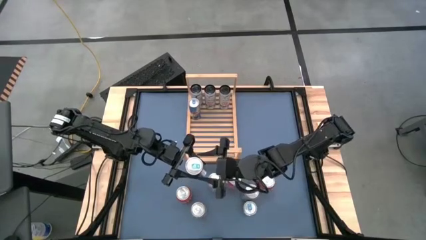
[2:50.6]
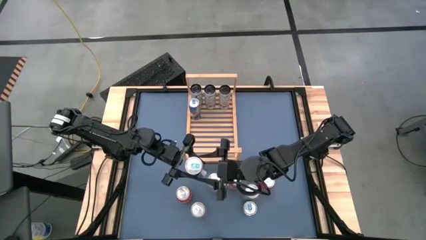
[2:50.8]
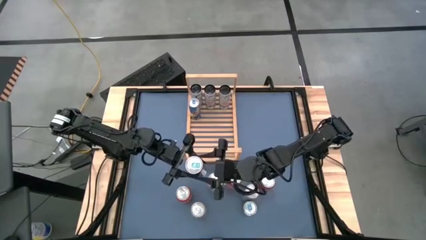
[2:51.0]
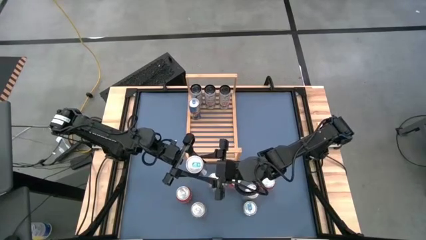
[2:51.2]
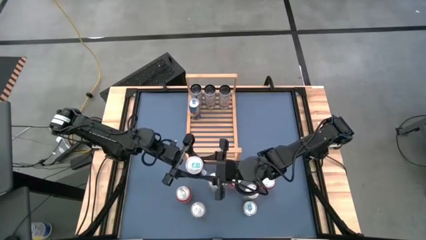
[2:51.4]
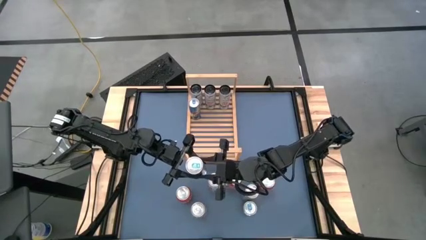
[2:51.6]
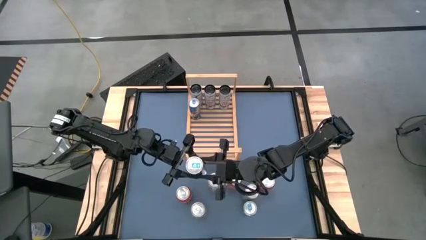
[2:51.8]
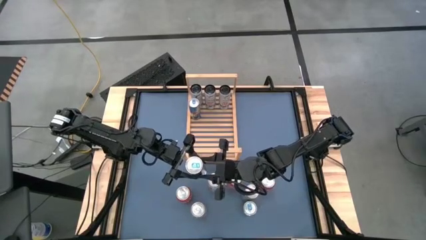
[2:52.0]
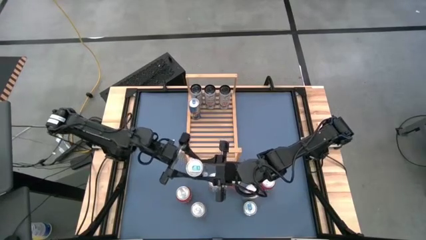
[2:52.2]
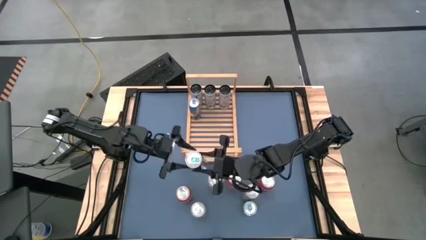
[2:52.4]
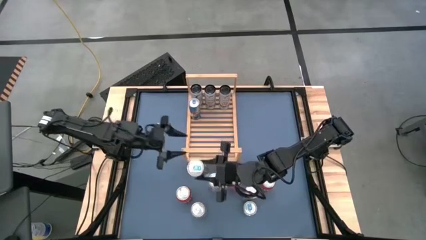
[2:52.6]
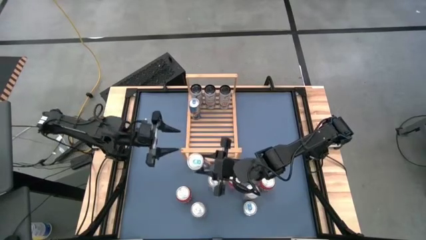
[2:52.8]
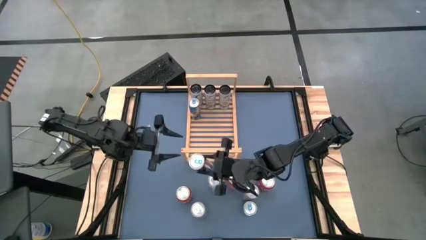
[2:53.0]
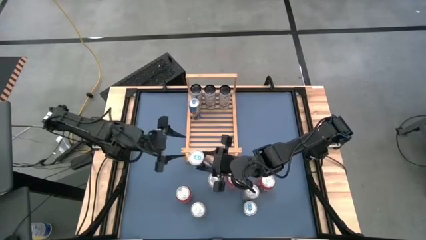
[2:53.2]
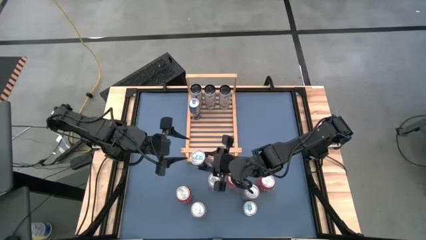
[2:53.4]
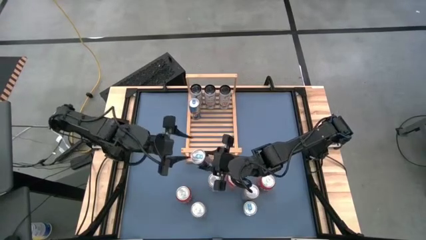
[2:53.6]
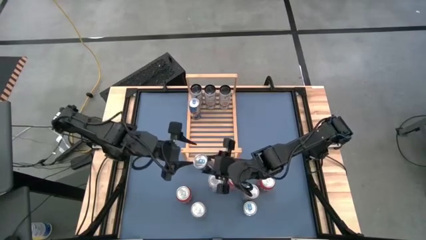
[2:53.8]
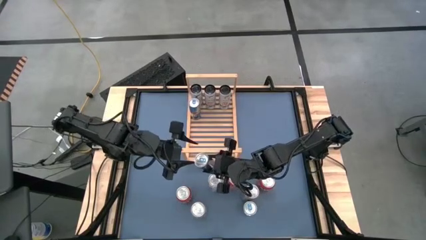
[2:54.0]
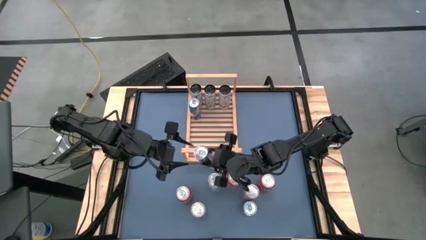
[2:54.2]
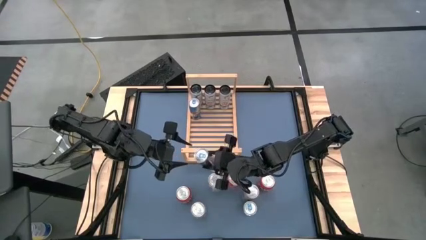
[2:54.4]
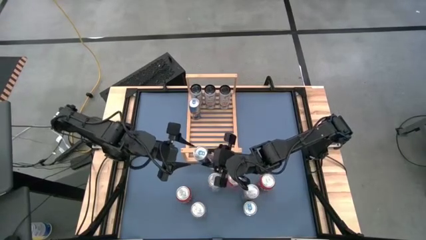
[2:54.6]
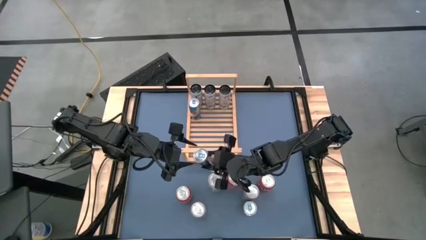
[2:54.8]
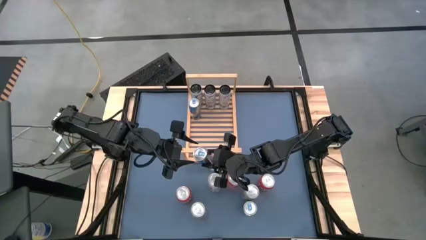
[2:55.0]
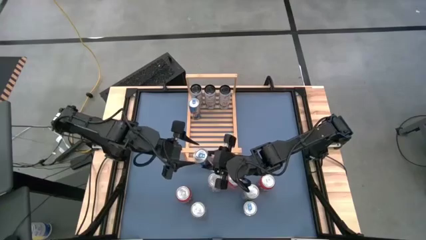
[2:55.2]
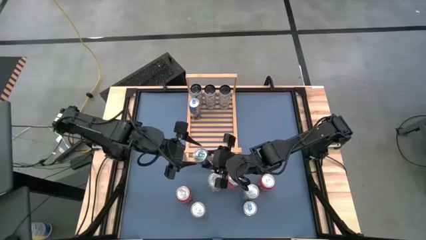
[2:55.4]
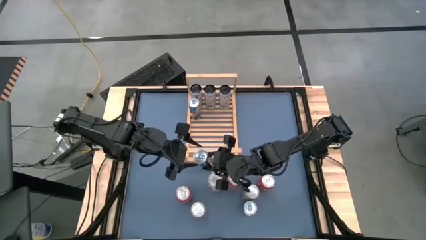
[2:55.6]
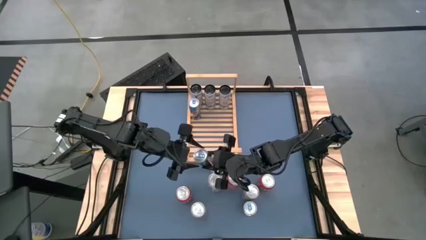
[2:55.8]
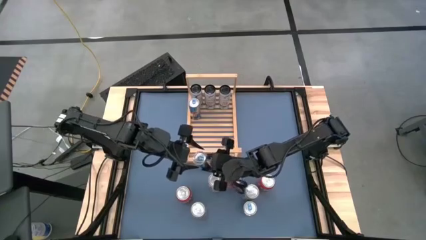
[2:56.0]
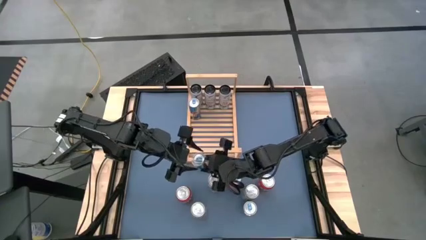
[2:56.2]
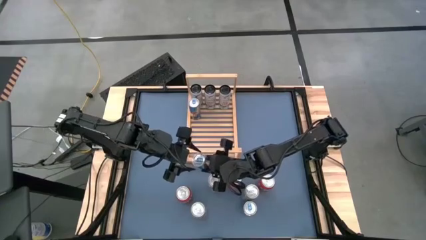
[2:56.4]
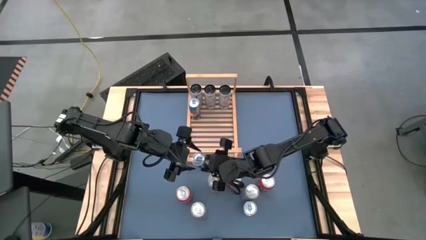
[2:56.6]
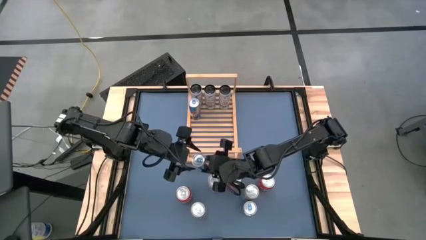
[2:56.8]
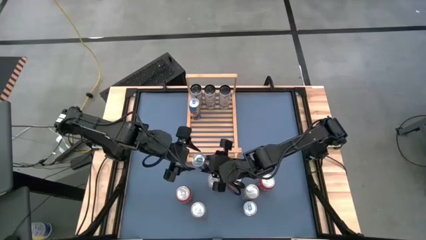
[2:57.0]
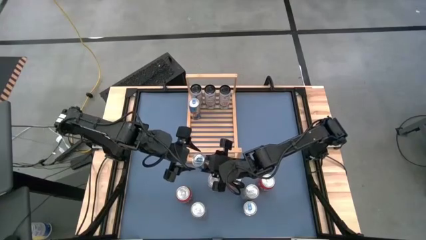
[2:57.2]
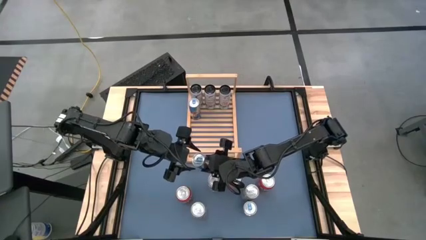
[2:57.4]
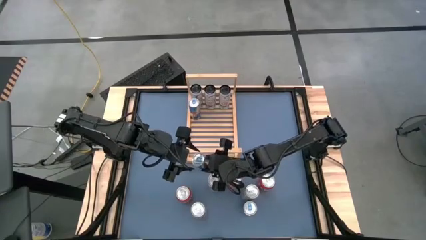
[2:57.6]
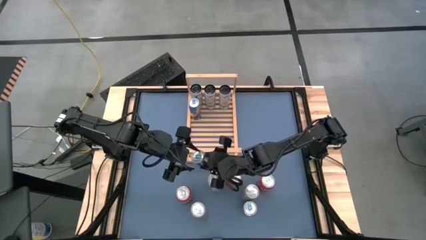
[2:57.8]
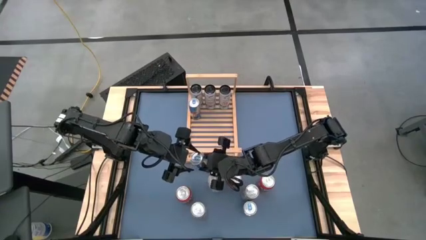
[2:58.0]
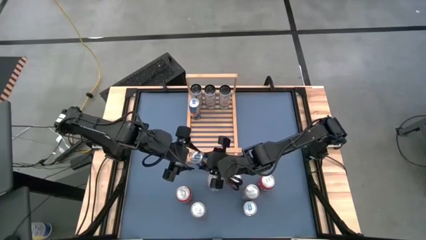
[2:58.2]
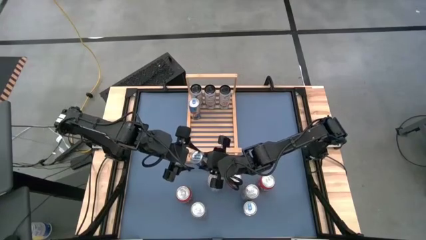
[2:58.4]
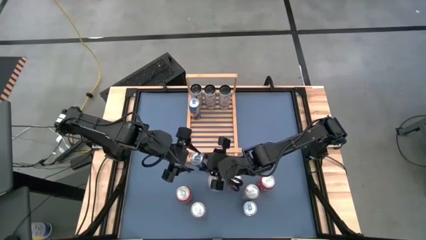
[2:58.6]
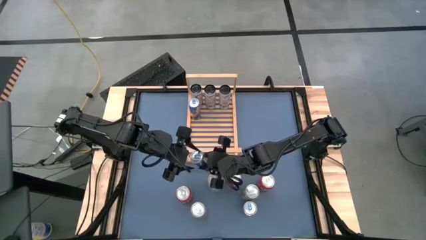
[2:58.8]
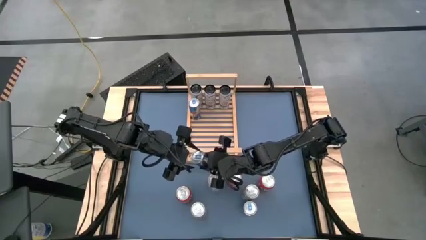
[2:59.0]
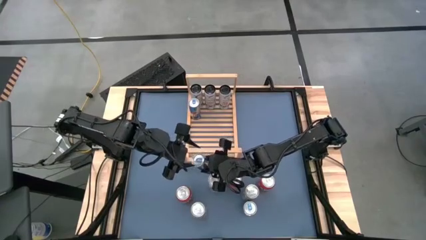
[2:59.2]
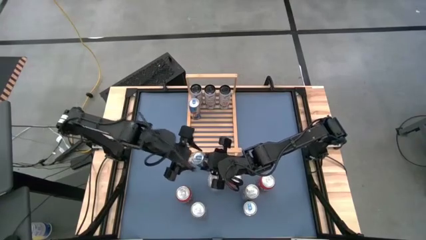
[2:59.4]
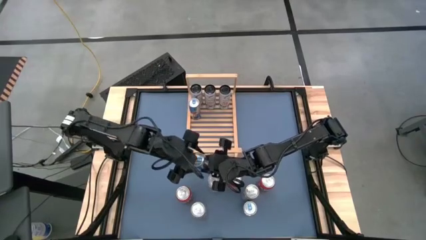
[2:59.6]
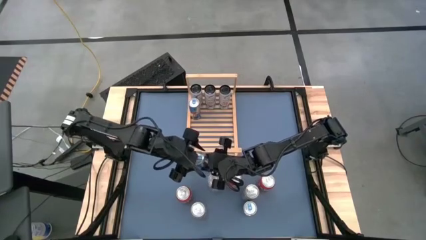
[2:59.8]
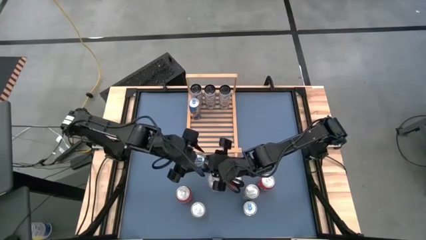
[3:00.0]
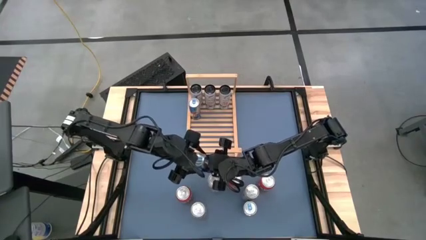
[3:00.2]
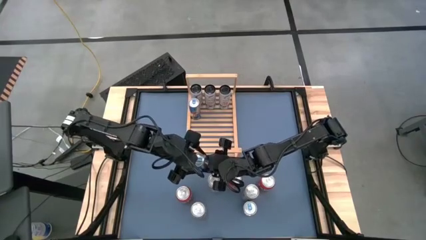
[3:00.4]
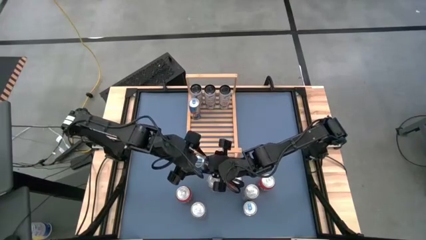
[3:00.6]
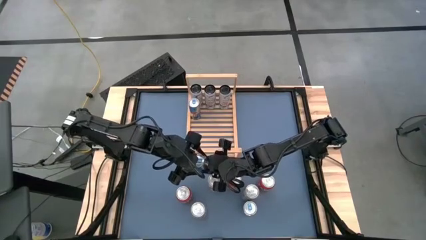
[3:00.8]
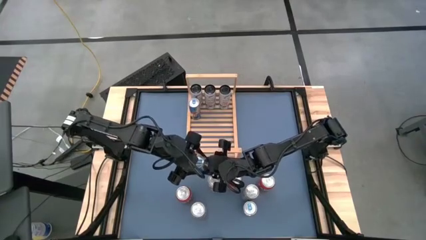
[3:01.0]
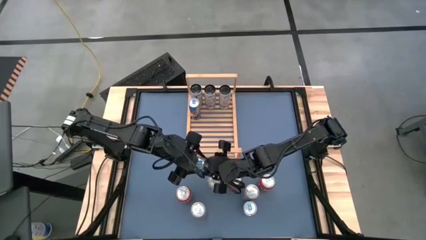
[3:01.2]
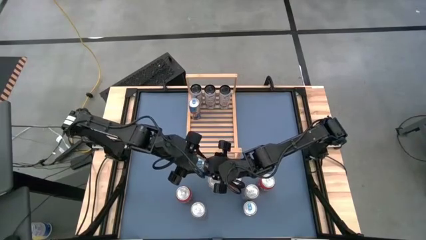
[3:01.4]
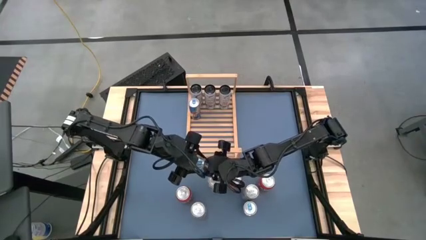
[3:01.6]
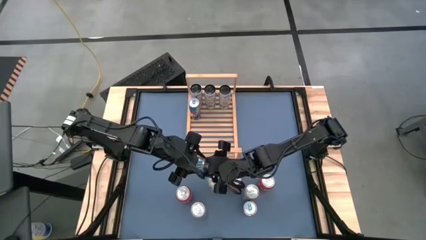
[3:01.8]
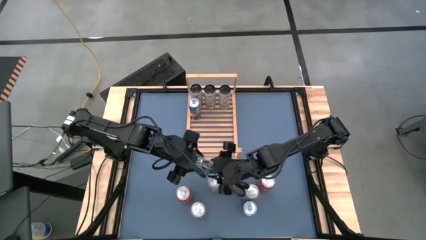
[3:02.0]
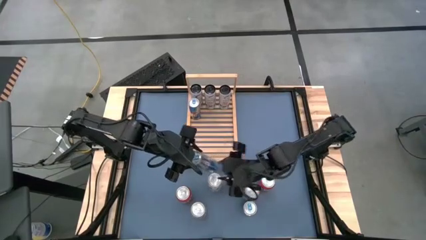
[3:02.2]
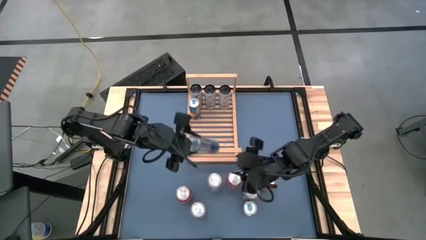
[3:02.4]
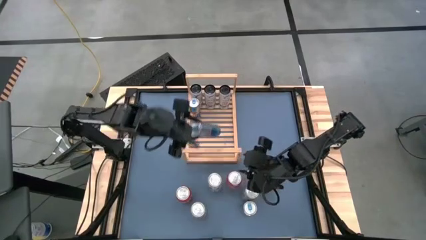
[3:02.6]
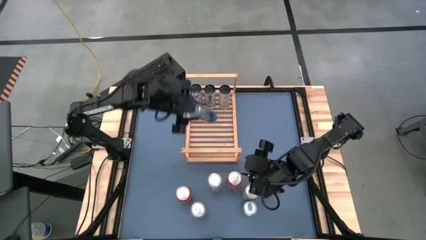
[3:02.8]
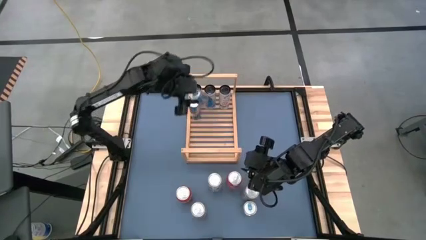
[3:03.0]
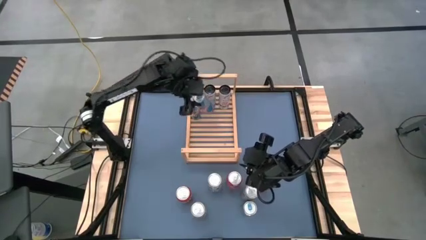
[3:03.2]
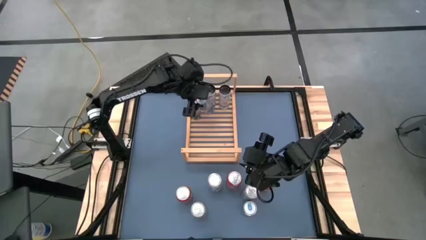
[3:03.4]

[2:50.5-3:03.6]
Task: Place canned beverage on shelf
Put the left blue soda can on the shelf aligned with the other blue soda can

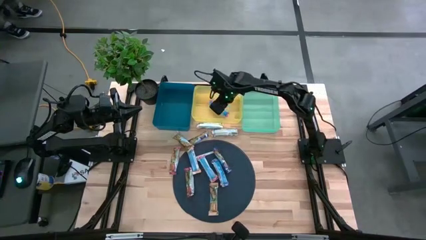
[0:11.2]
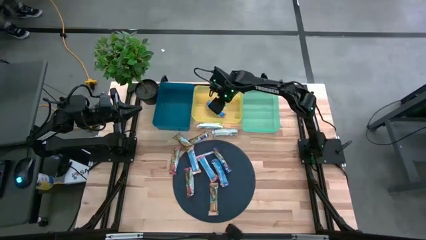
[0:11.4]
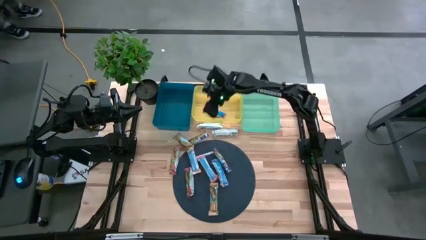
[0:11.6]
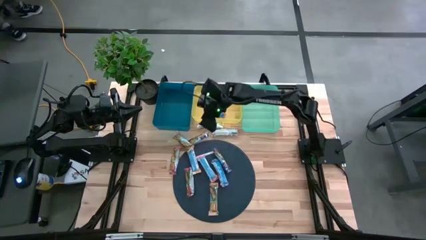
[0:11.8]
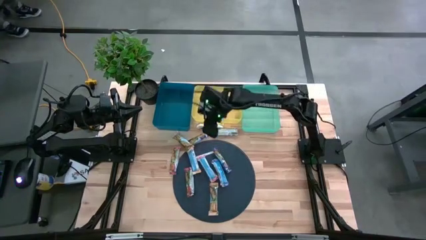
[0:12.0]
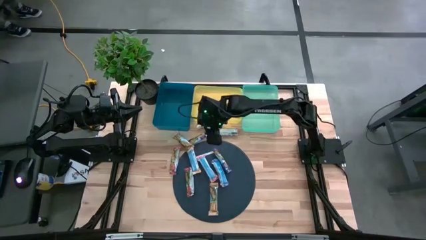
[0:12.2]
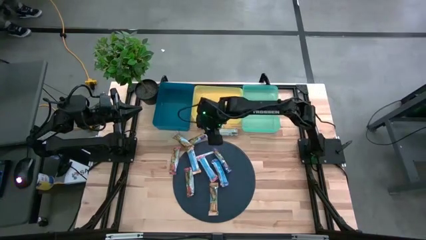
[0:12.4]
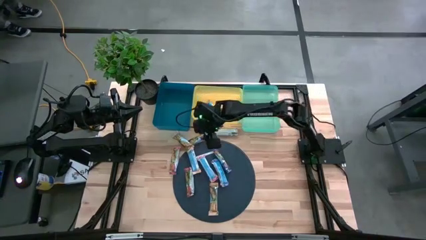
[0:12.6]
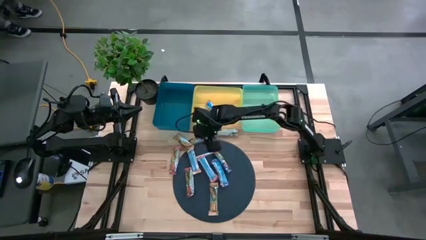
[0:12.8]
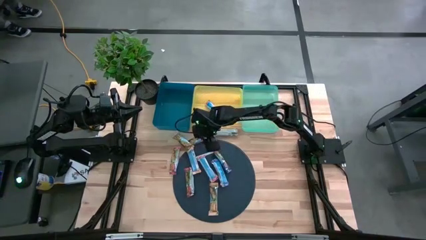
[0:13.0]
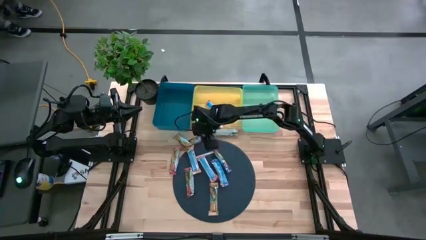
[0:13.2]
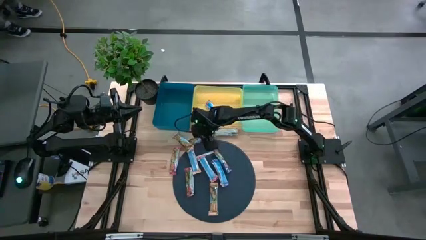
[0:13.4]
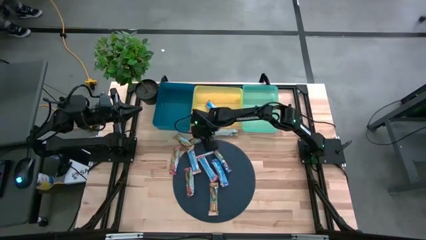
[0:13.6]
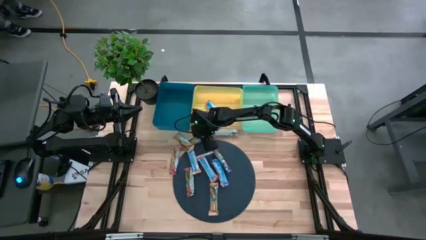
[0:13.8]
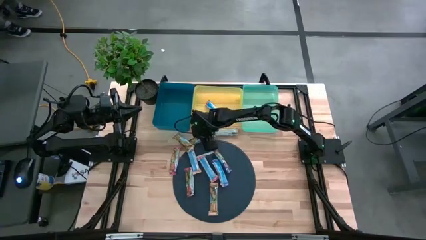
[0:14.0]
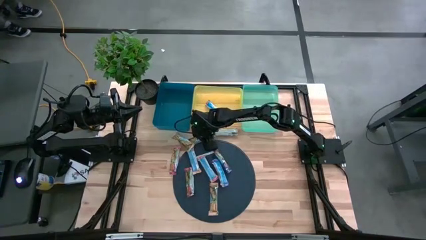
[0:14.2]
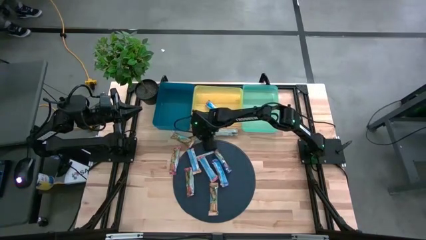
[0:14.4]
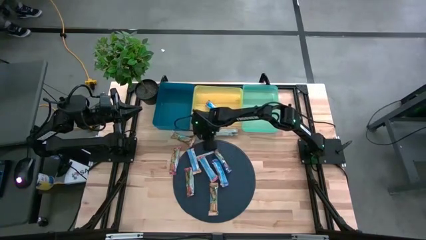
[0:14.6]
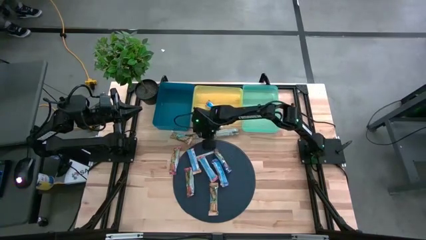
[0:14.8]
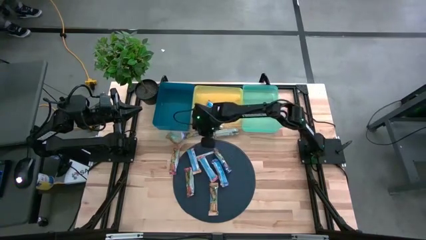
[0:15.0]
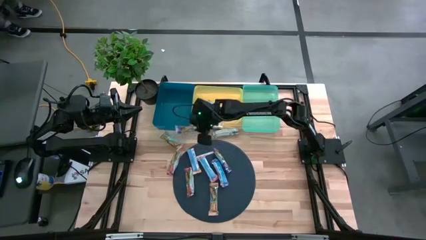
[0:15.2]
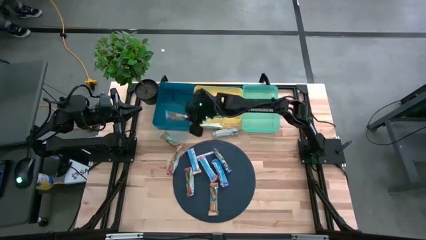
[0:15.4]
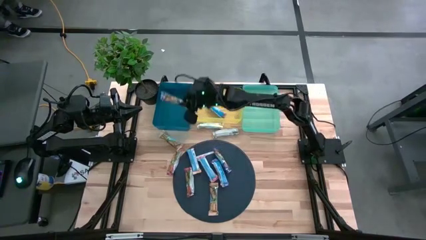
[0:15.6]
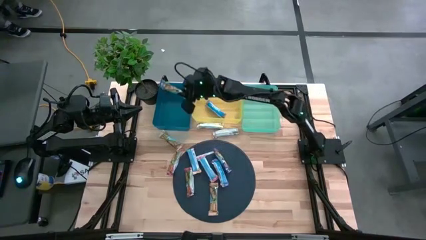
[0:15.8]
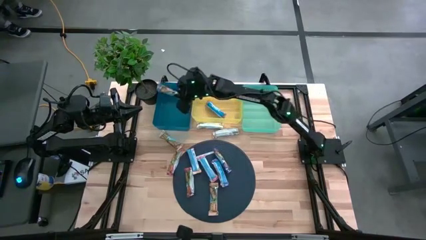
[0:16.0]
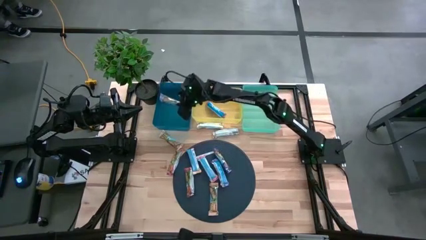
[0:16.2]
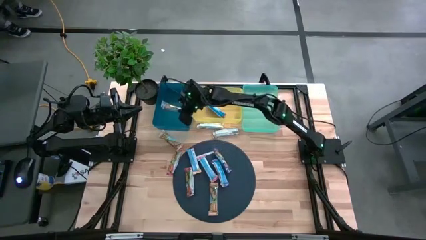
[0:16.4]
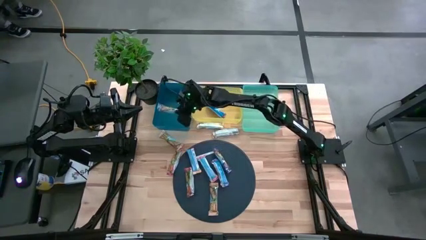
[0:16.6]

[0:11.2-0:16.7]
Task: Pick and place Granola Bars by type
Put the blue granola bar into the blue bin
